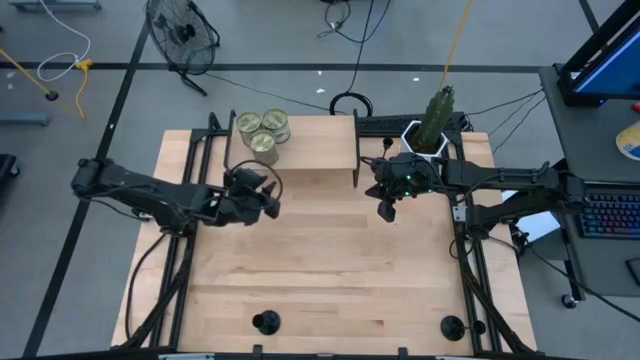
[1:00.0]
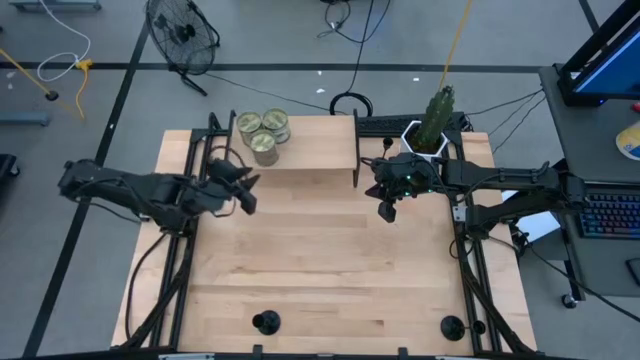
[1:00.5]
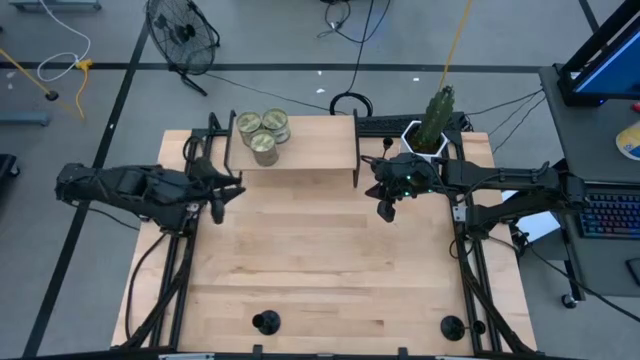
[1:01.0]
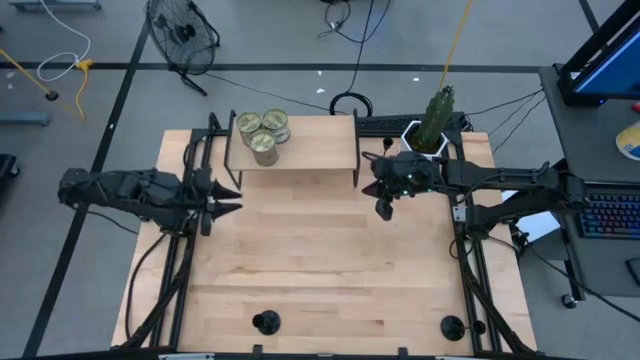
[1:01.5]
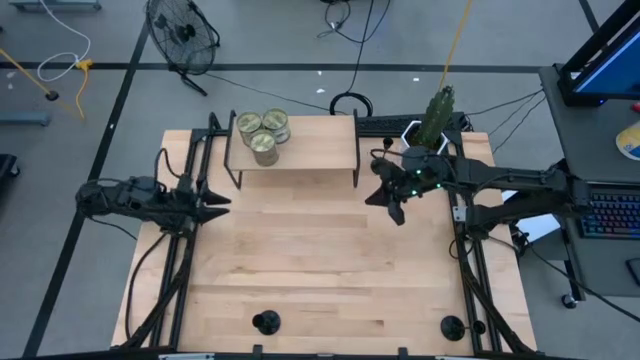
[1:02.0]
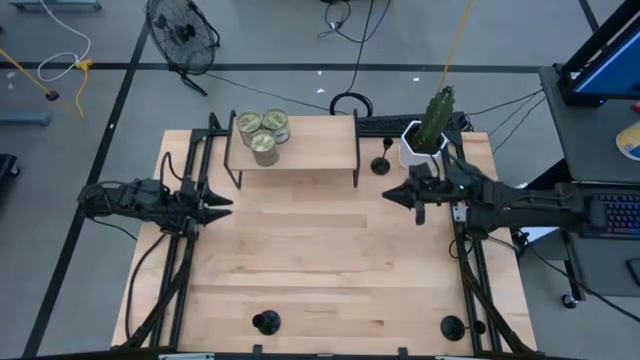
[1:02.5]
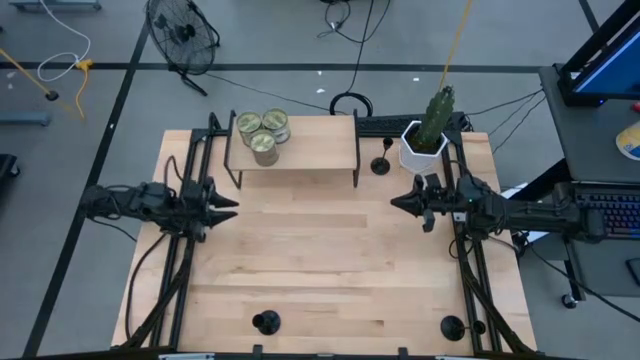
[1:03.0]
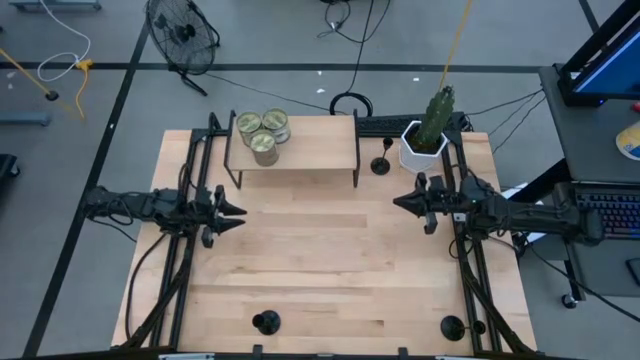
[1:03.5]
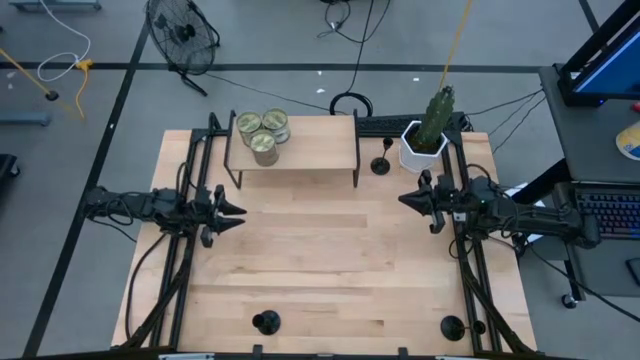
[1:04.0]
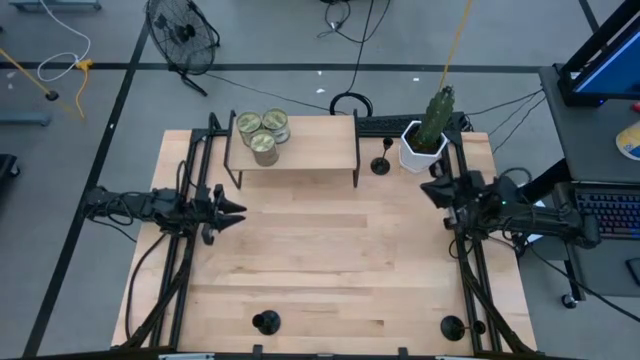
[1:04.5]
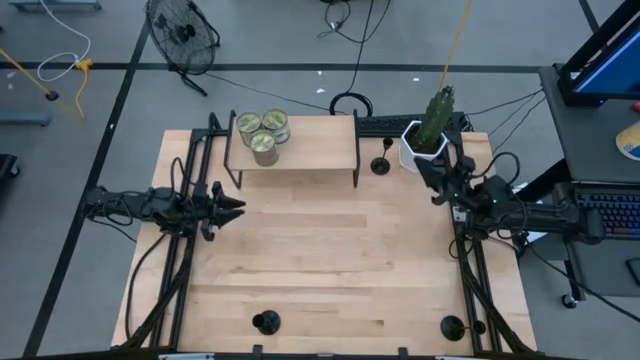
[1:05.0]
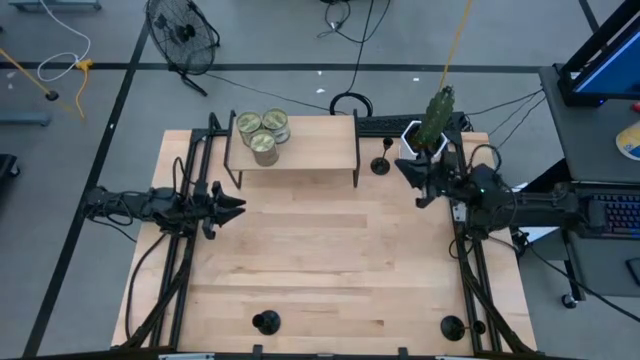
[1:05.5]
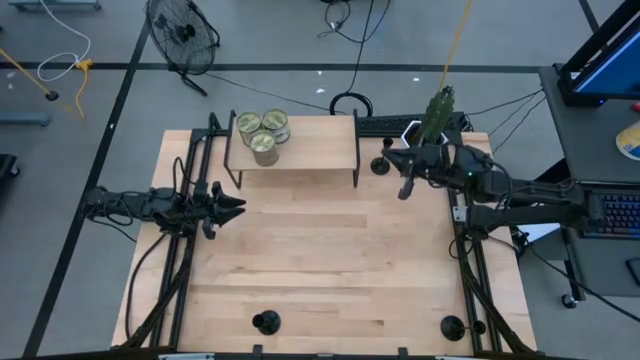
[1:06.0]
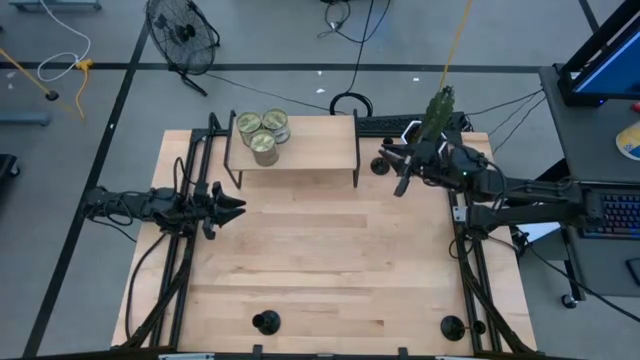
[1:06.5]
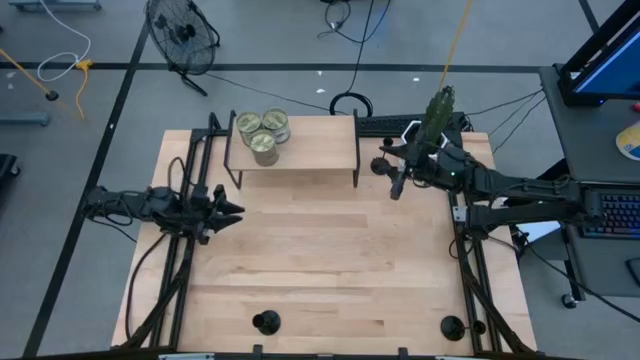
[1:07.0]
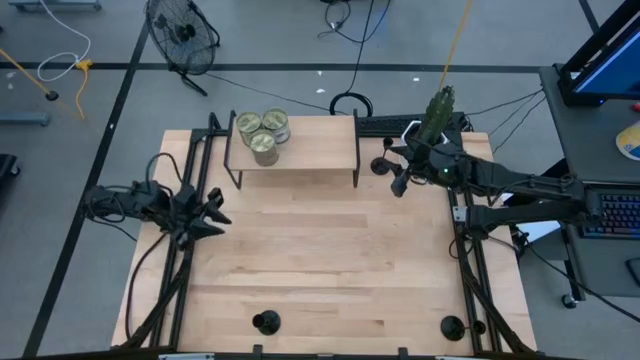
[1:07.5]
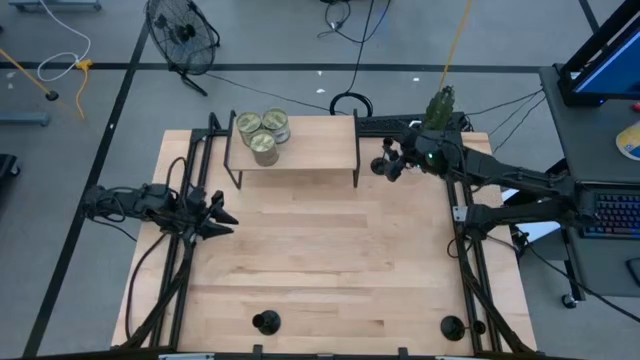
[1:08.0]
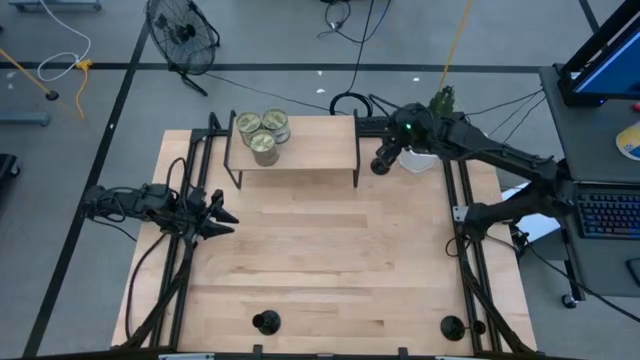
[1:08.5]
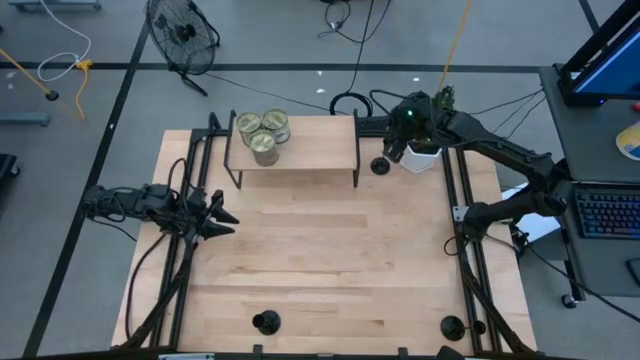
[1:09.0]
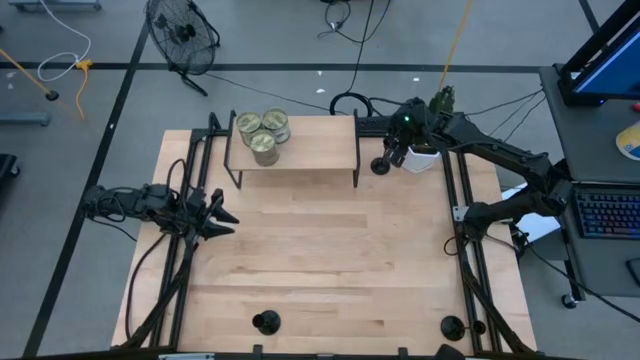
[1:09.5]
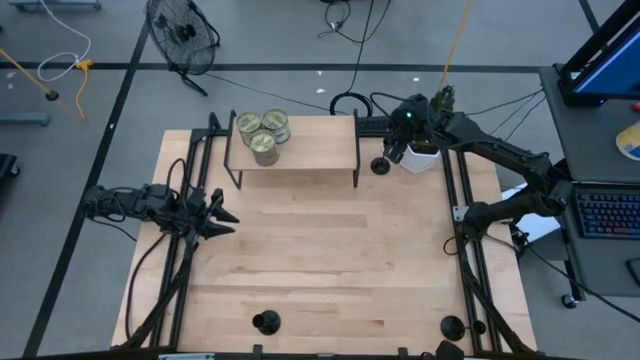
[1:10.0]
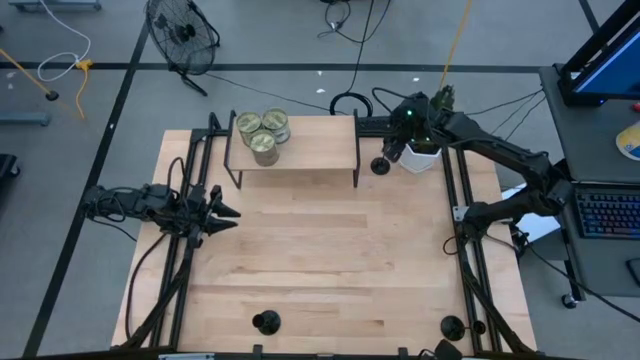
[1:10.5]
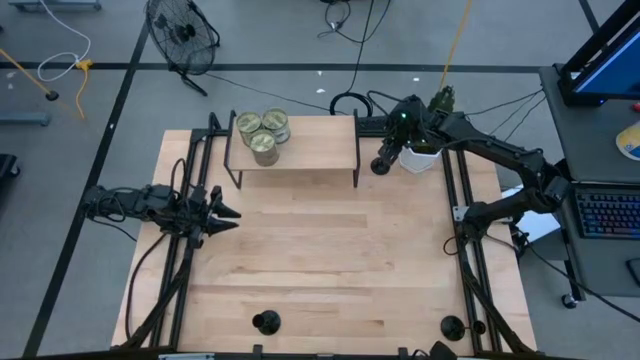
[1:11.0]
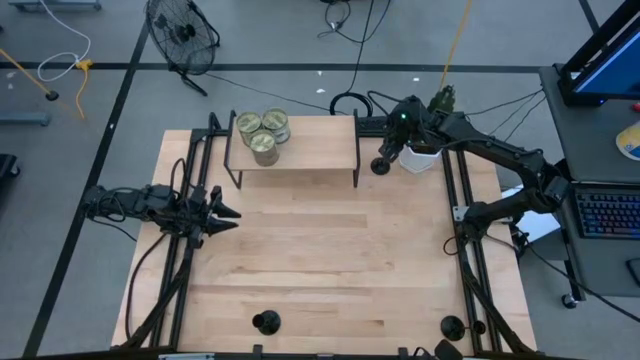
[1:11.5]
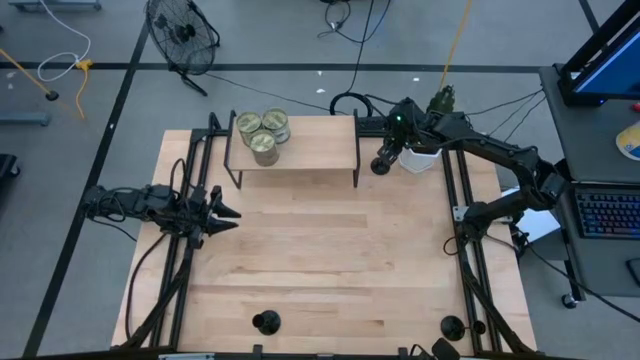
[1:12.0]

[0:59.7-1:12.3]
Task: Pick & Place candle stick holders
Put the top black candle holder on the shelf
